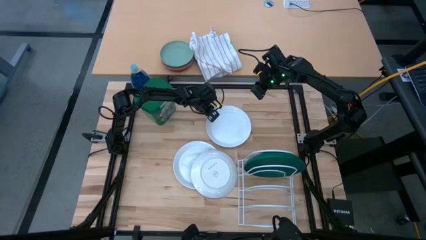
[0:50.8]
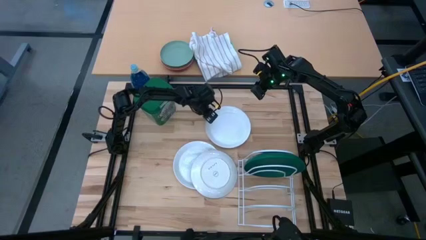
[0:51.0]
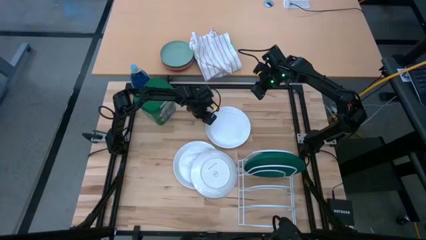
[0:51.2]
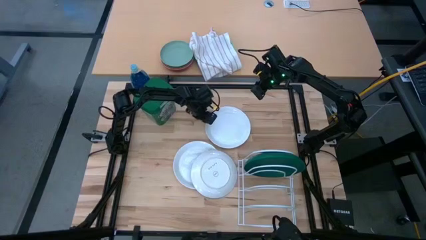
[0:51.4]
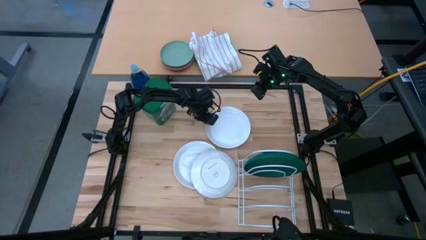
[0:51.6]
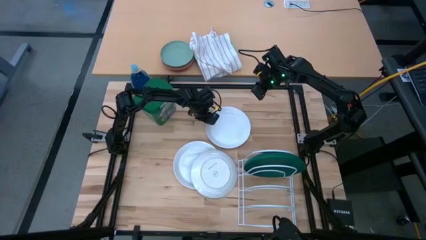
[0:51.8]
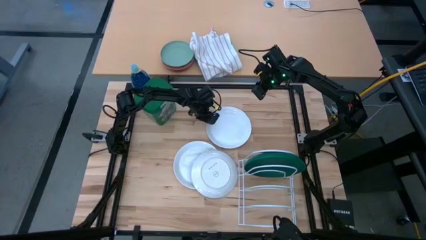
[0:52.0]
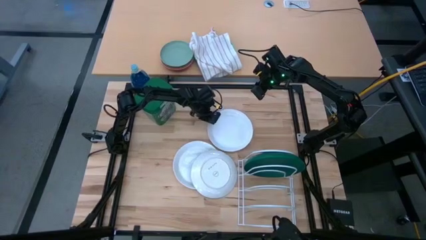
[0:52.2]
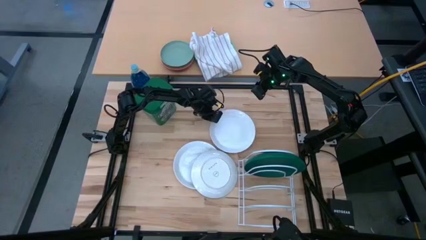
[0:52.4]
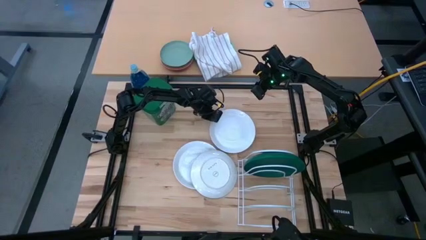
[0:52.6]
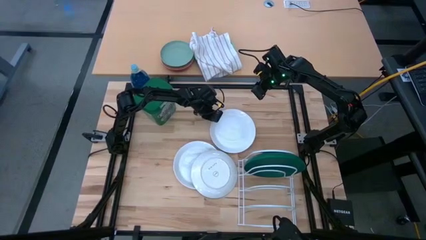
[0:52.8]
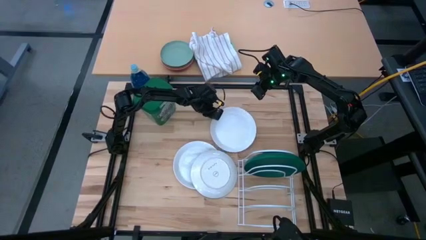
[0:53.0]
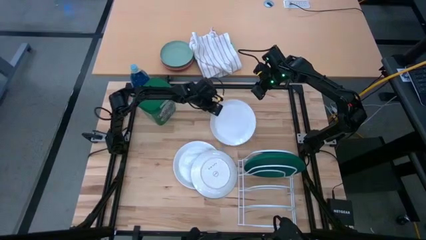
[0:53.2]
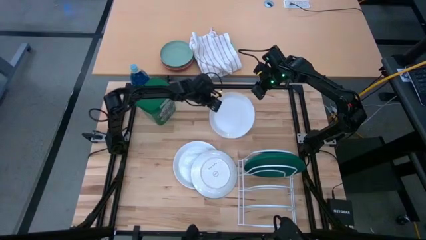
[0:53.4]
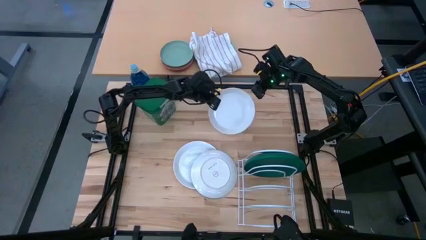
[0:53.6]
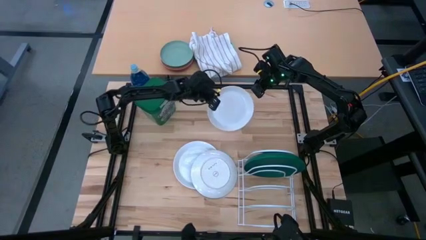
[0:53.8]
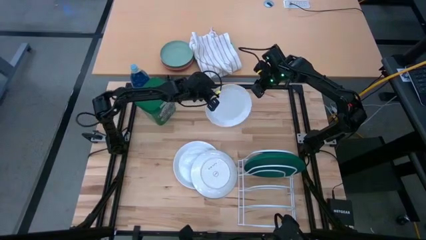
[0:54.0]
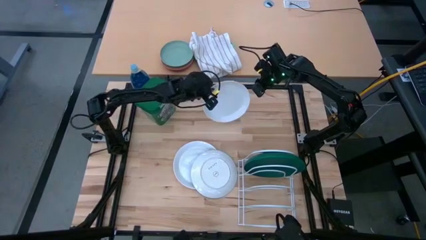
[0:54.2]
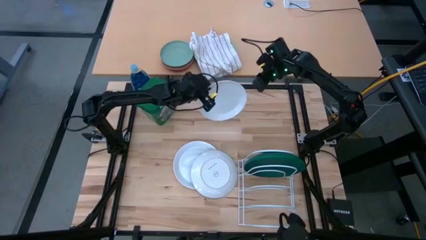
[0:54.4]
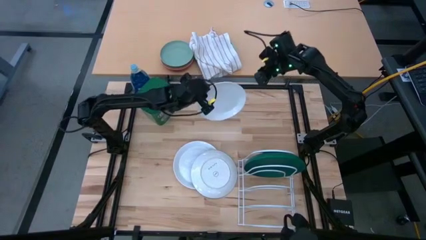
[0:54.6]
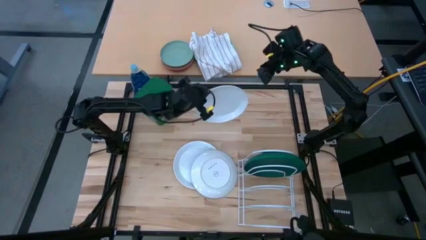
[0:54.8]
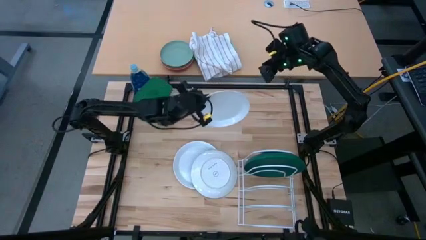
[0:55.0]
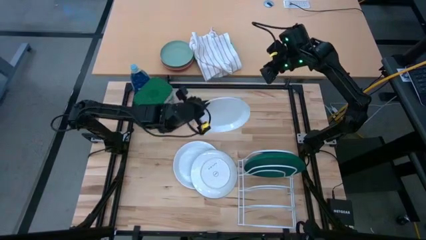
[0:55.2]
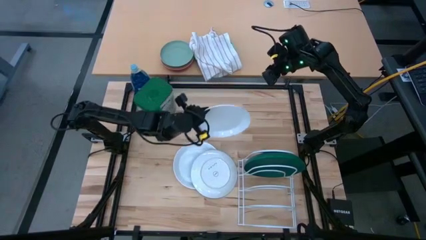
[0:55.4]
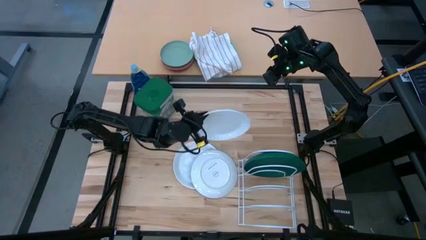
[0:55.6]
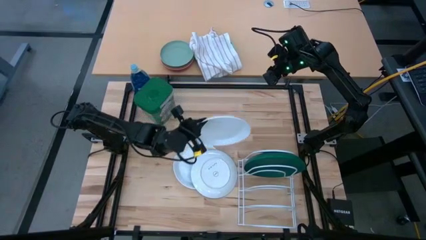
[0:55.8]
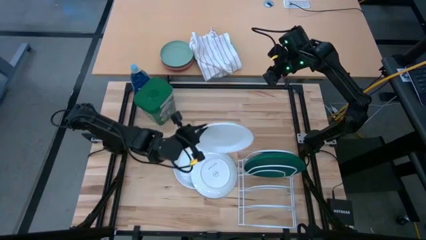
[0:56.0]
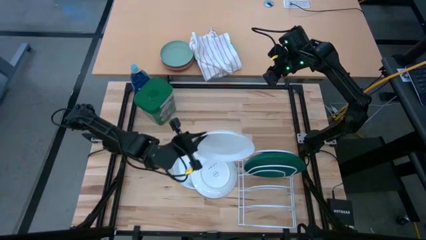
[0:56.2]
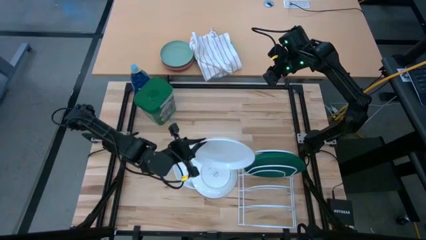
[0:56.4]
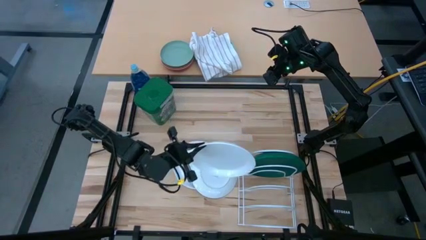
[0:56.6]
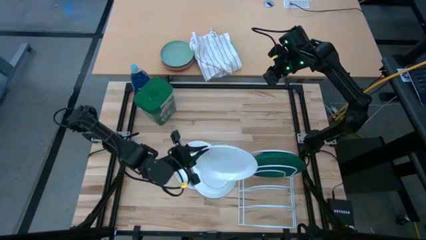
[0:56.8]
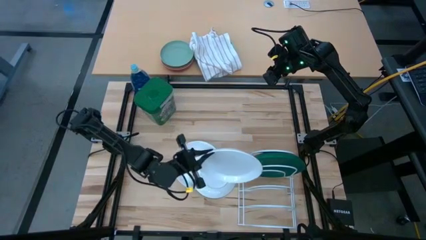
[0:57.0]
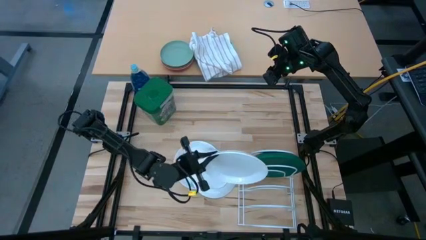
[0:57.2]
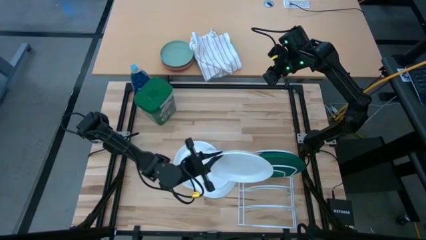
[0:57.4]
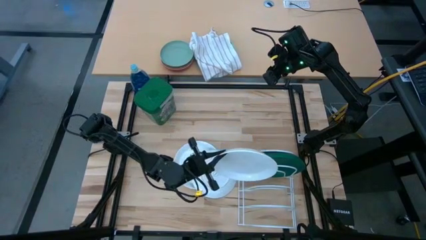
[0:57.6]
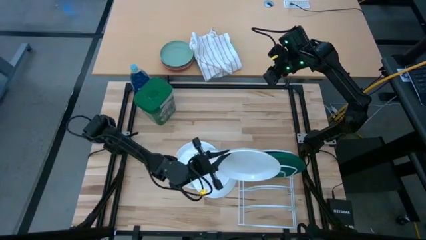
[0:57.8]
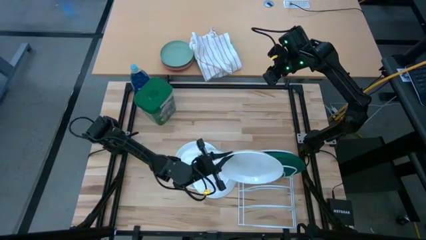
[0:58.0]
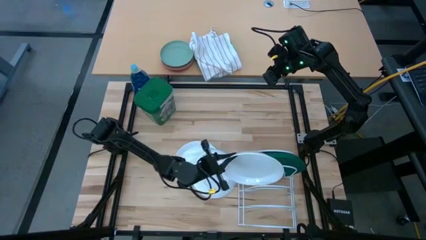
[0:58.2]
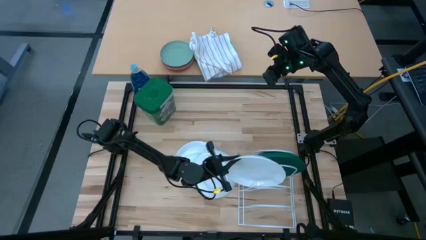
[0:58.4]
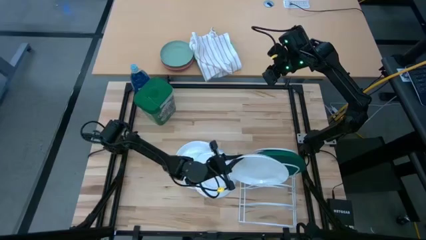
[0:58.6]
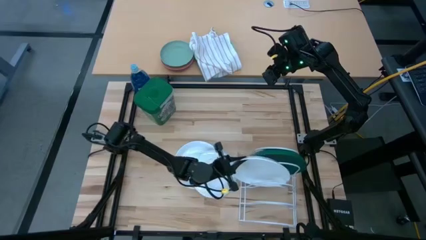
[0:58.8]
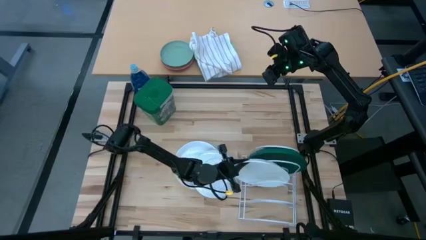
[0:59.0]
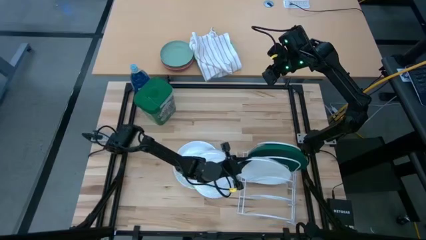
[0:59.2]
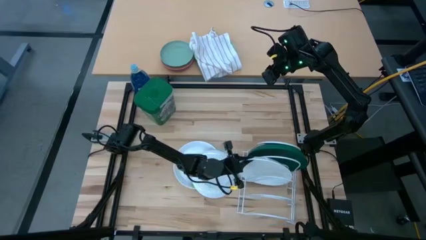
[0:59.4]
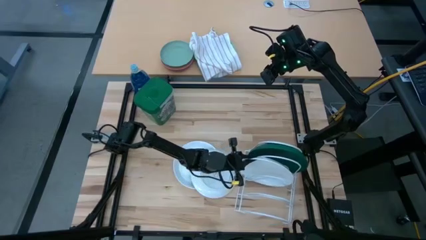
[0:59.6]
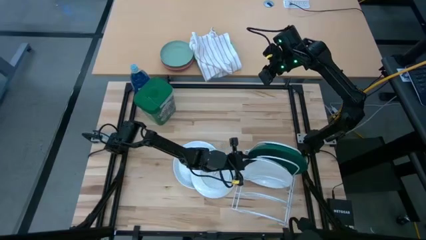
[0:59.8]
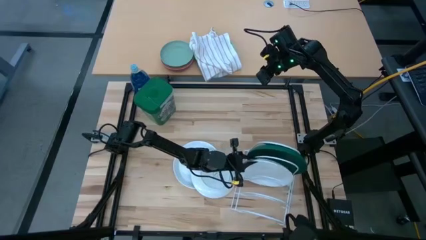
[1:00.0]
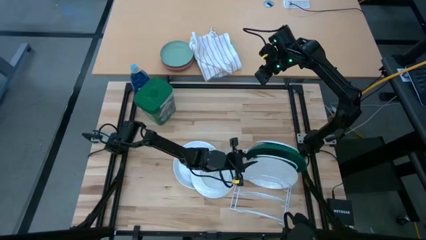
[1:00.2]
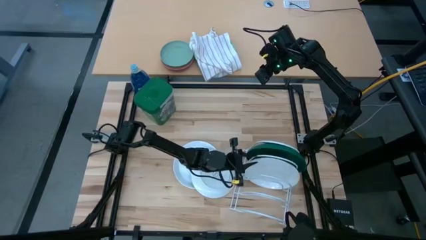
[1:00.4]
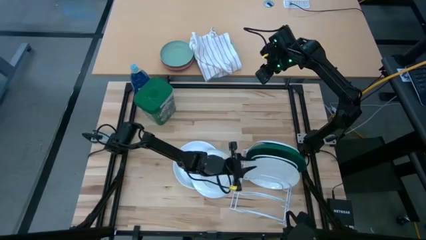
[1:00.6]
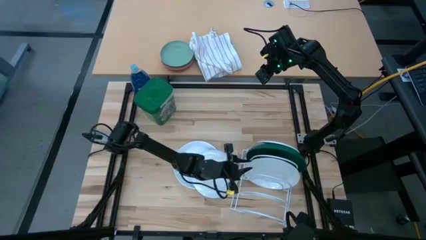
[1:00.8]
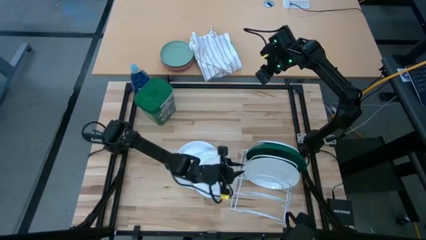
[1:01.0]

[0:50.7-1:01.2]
Task: Sort dishes
Put the top white plate on the dish rack
